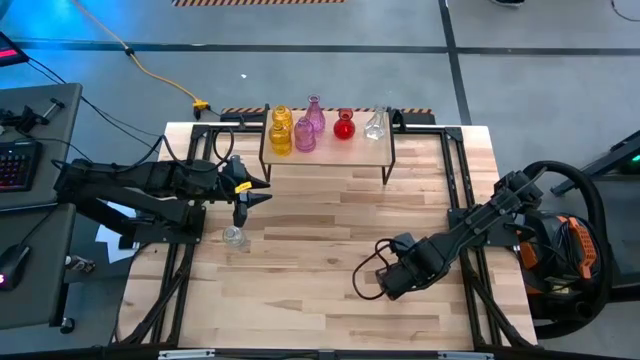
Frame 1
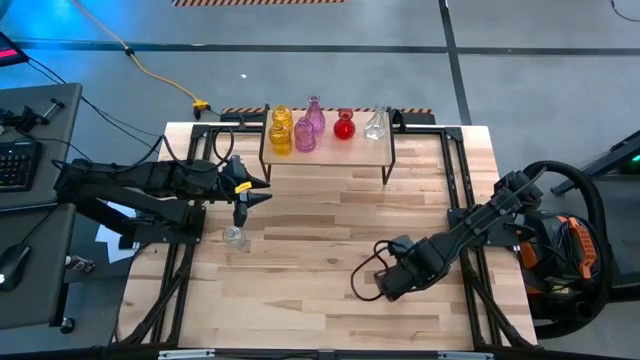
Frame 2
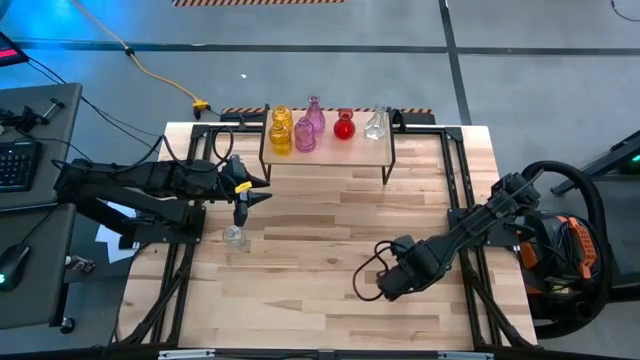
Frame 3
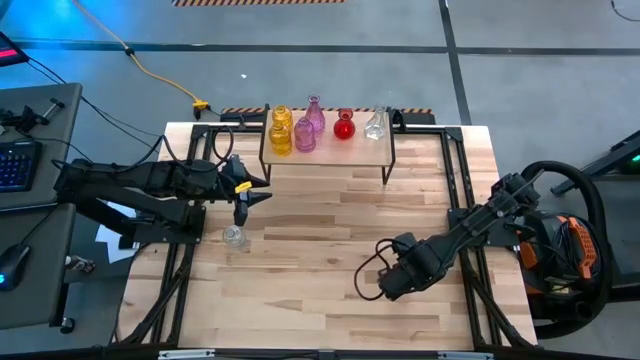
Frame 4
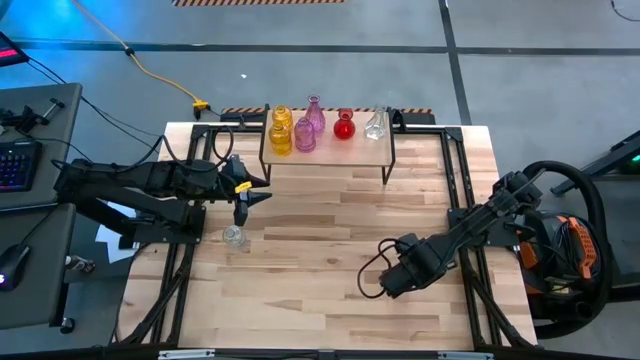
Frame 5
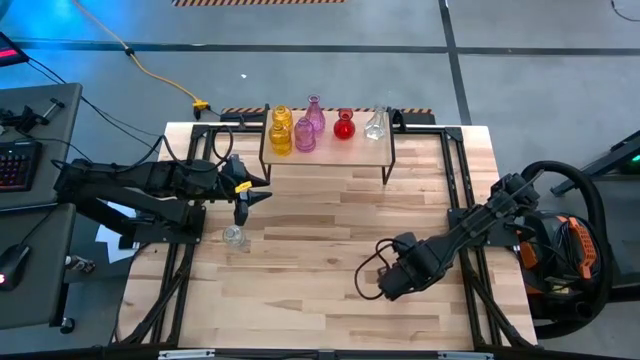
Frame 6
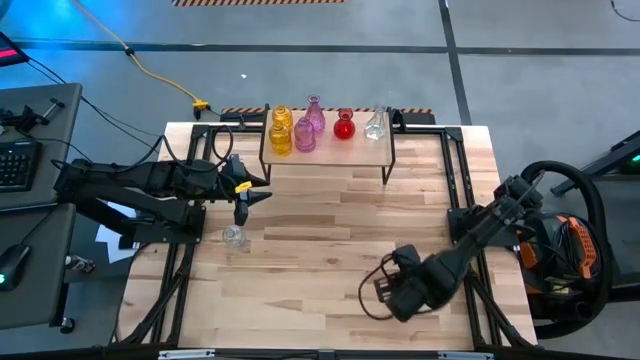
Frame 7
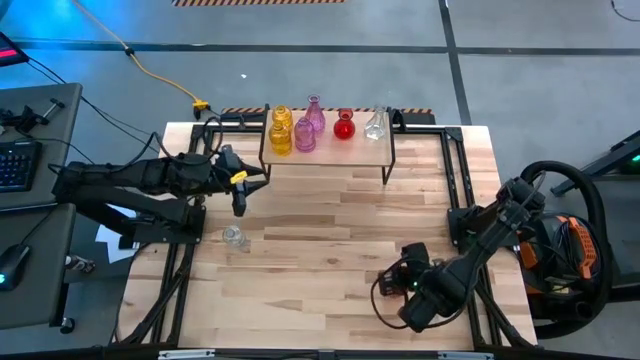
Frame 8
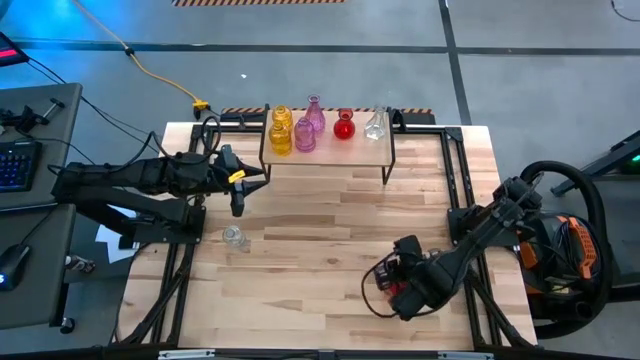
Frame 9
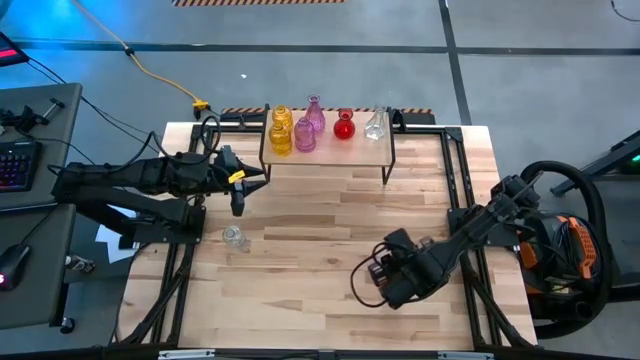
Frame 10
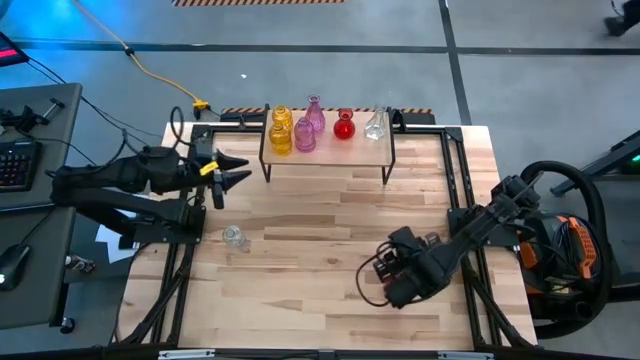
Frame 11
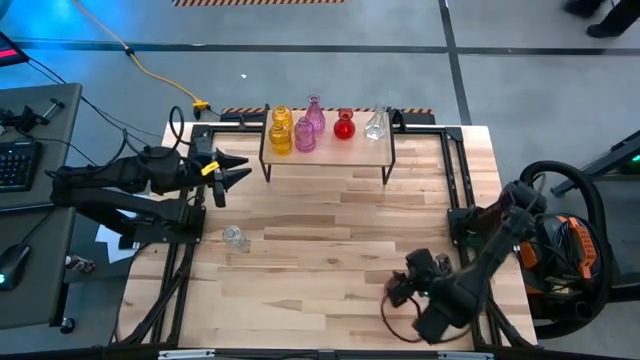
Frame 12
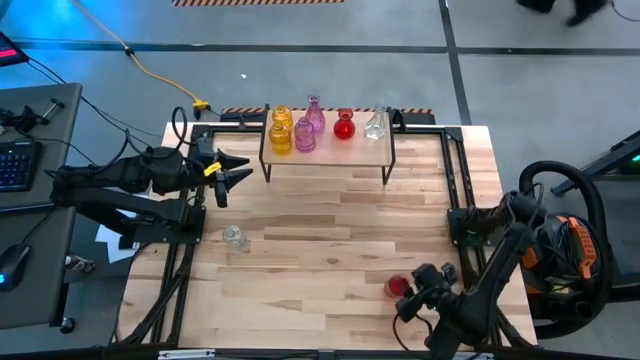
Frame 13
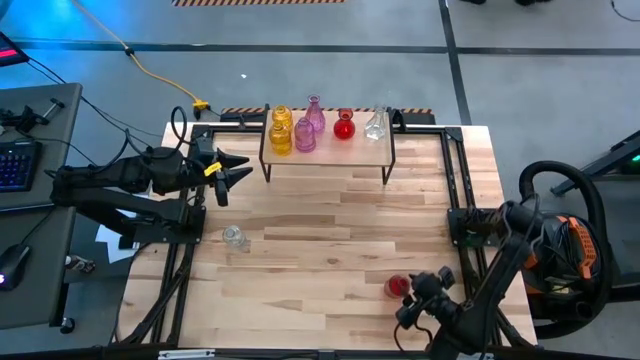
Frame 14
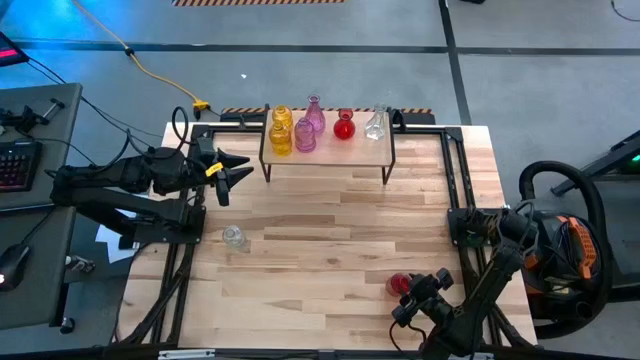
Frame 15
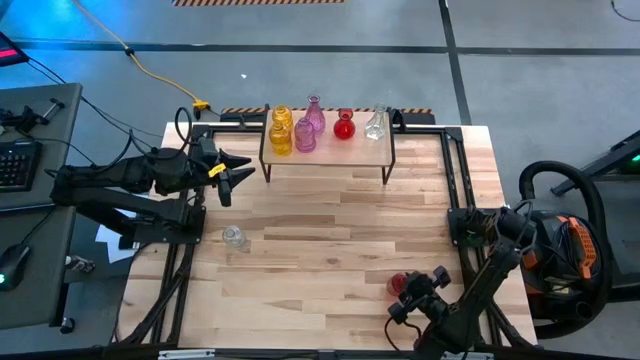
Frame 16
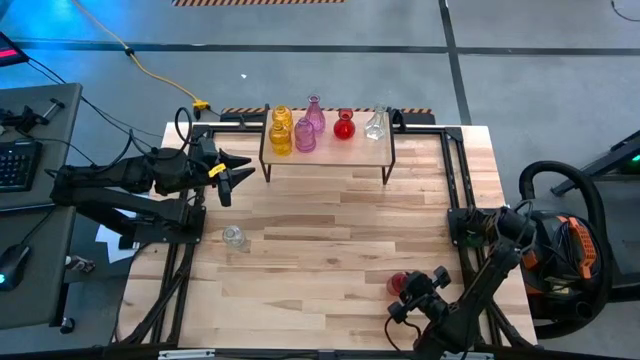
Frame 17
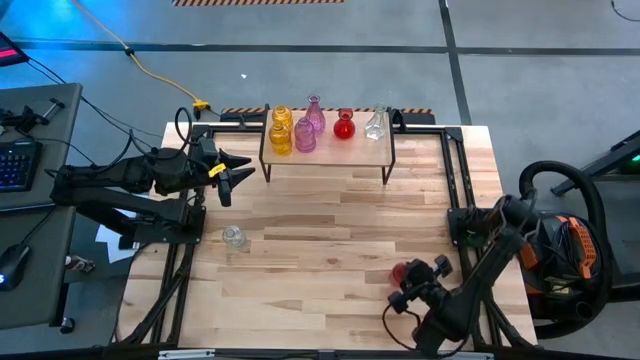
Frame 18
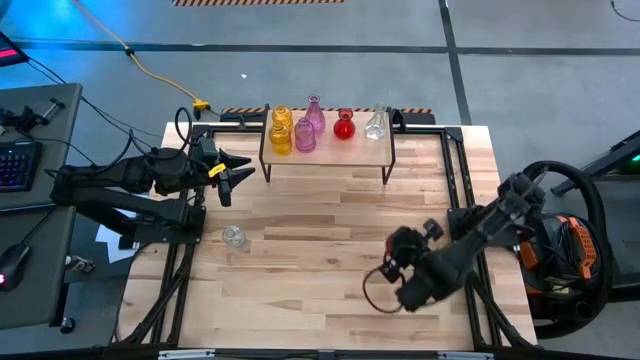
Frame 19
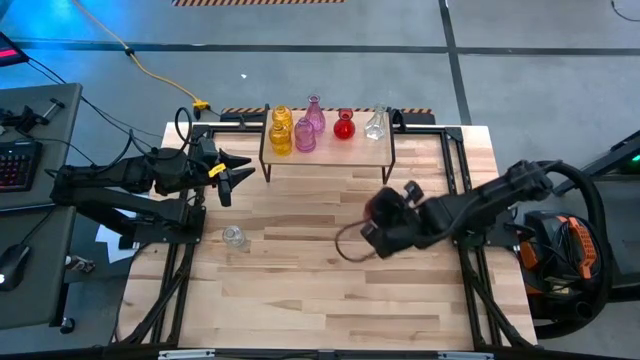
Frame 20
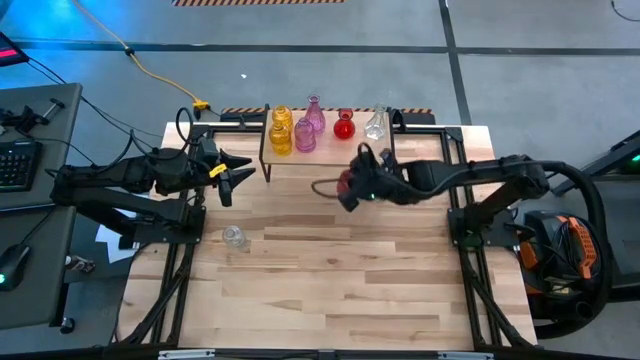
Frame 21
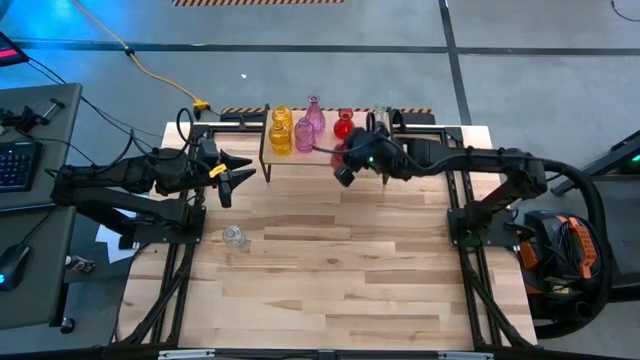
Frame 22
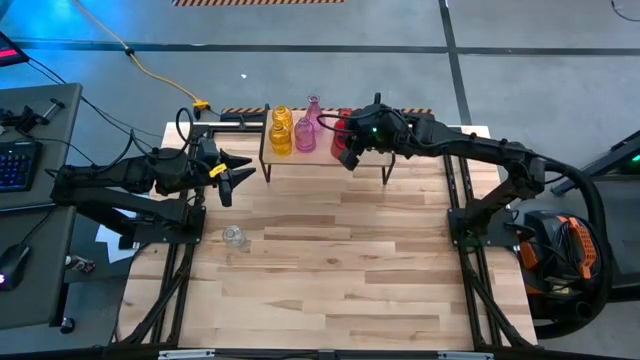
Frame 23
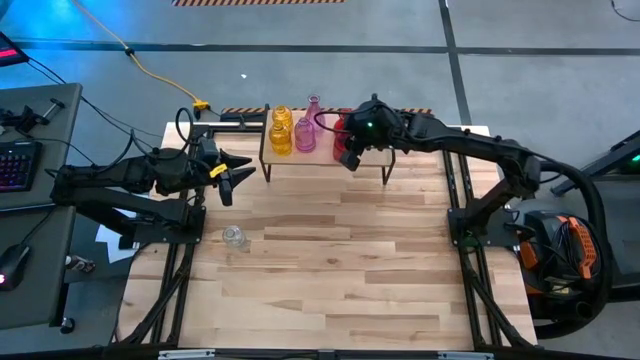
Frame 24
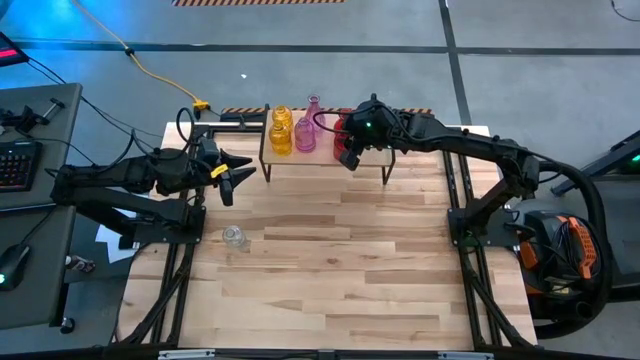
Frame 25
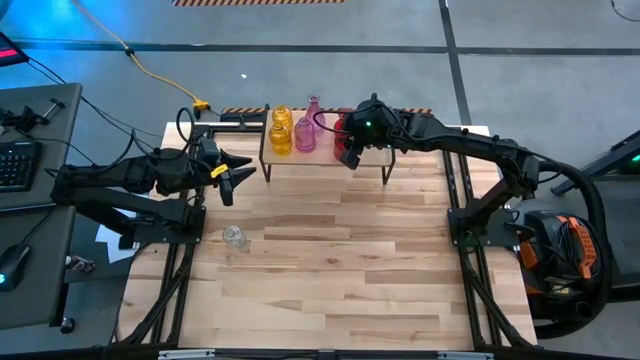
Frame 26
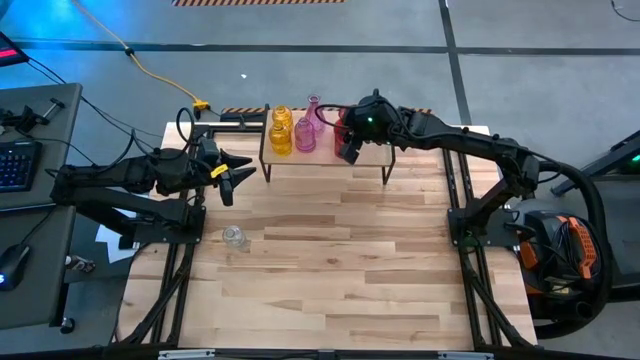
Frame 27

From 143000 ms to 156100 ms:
Task: sort vases onto shelf
Put the red vase on the shelf

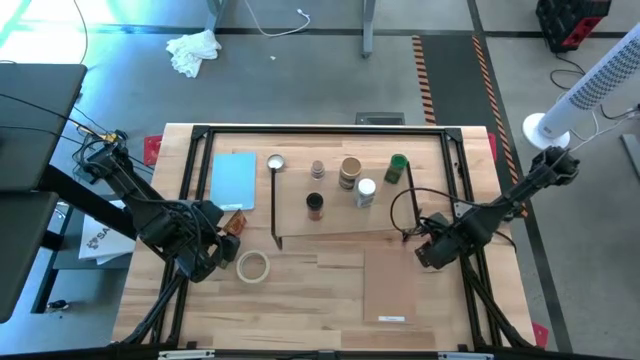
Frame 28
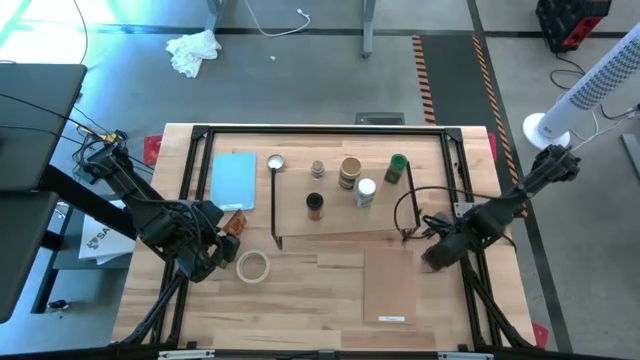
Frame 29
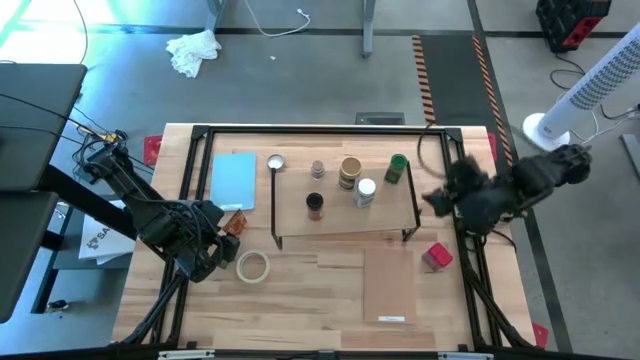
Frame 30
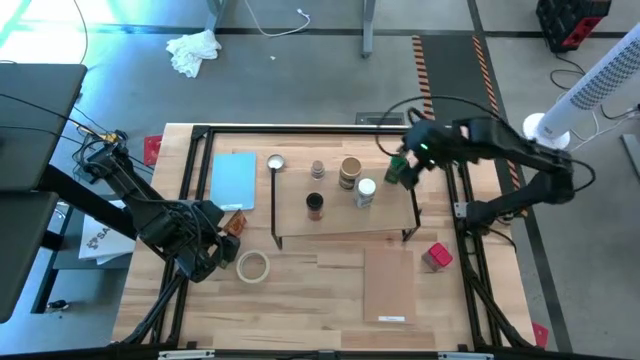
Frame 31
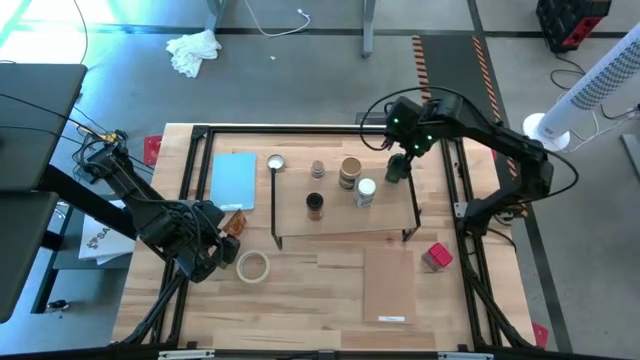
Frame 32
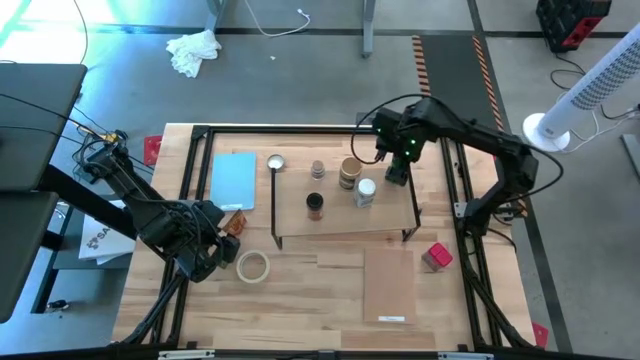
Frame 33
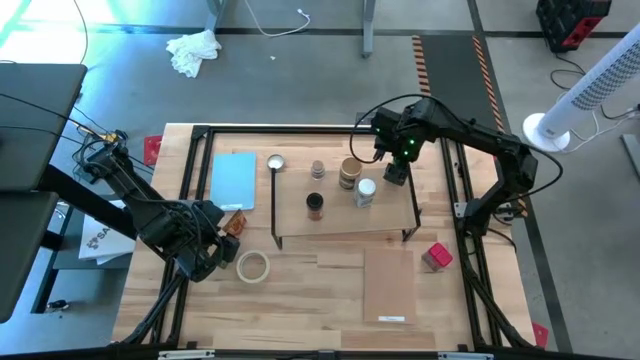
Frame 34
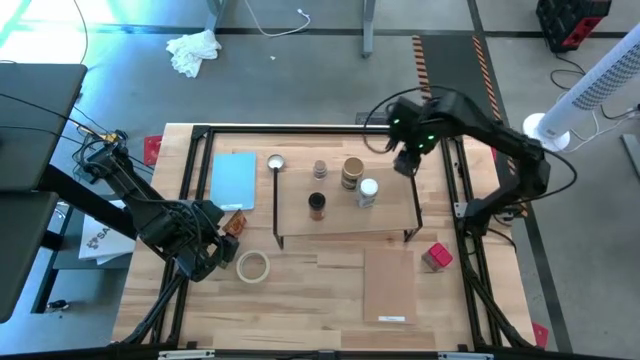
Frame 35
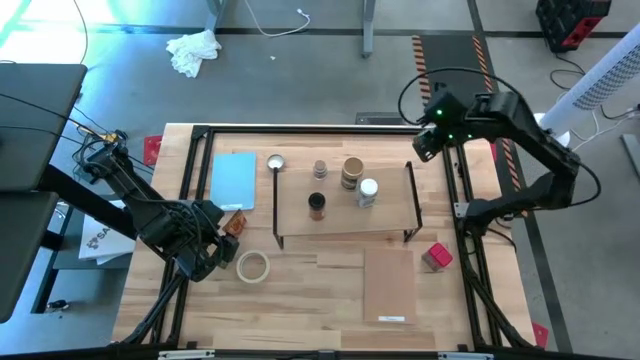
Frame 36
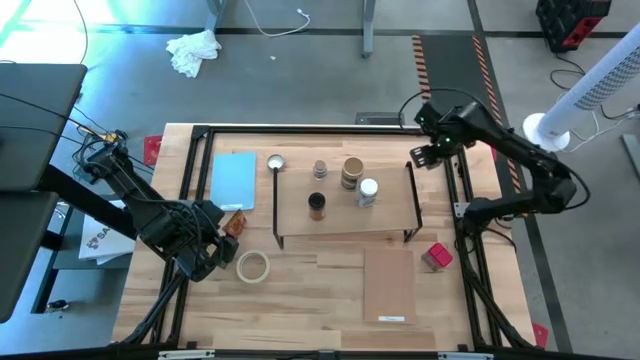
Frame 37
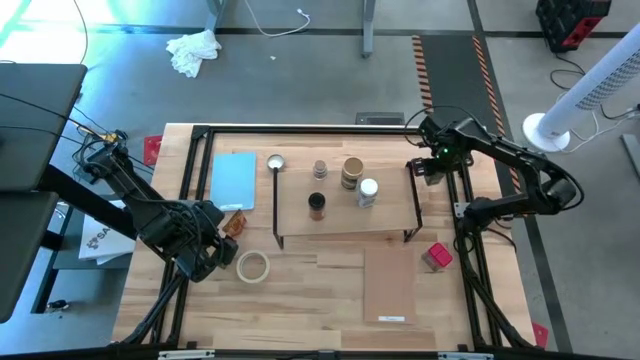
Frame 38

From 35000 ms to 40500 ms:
Task: Shelf spices
Remove the green seasoning bottle from the shelf

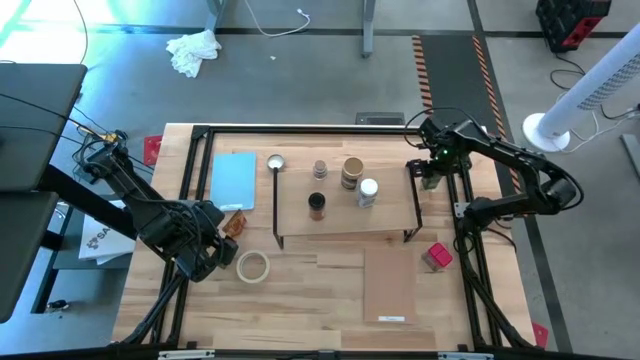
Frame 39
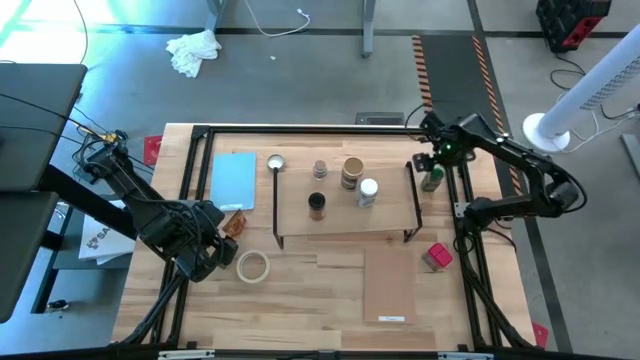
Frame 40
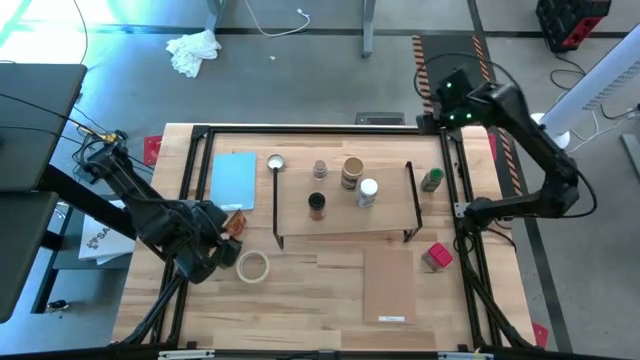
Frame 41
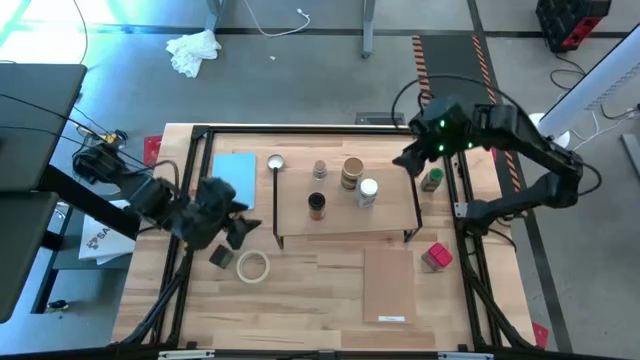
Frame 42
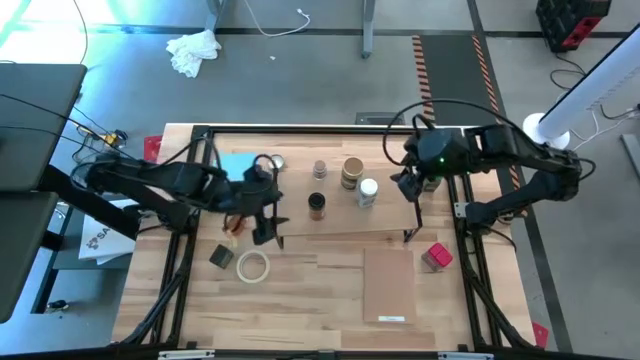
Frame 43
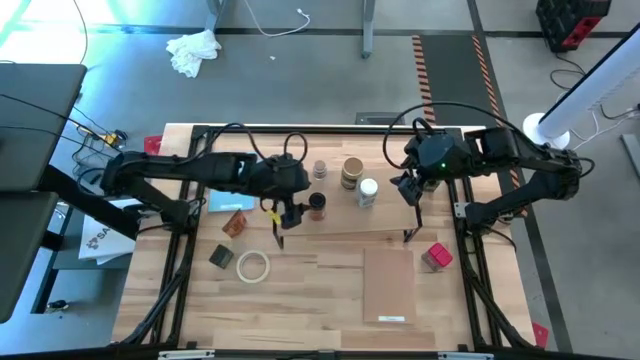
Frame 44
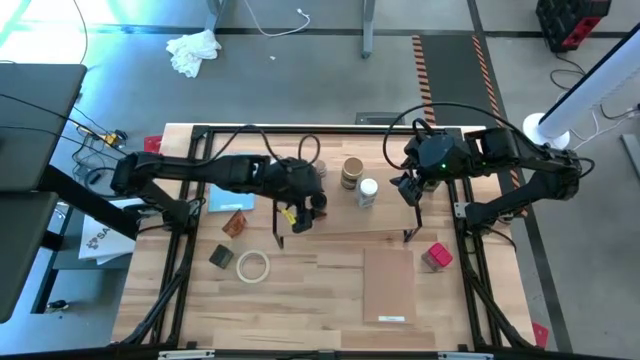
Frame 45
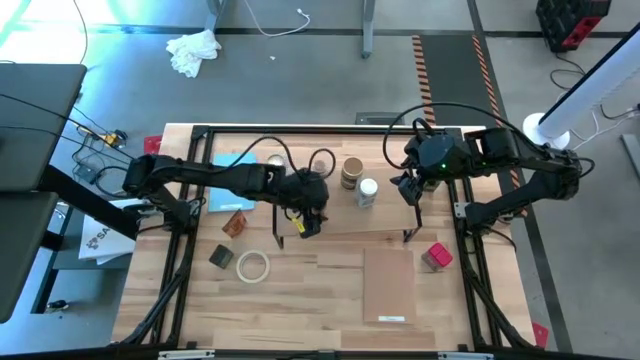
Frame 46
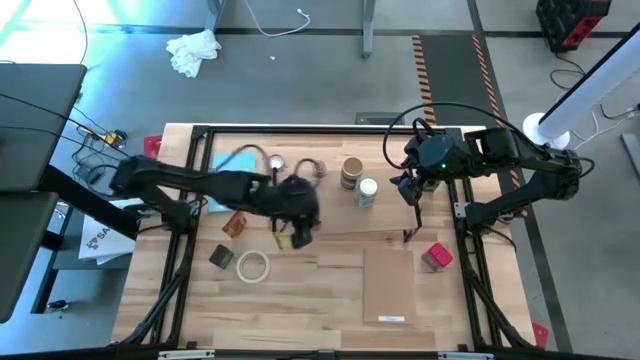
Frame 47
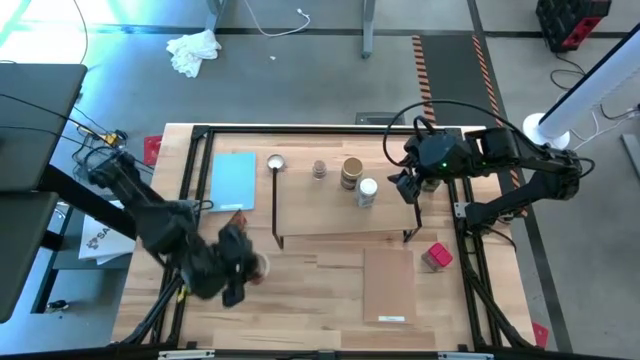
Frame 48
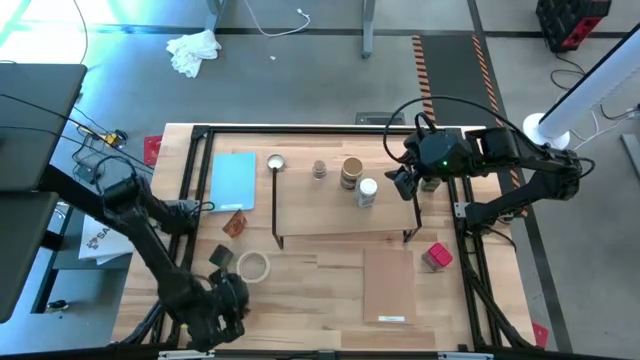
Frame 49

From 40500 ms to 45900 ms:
Remove the black seasoning bottle from the shelf
